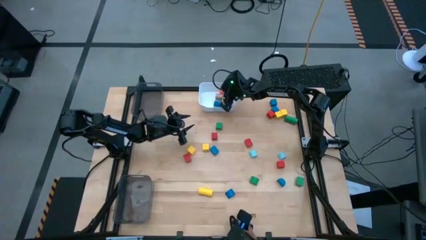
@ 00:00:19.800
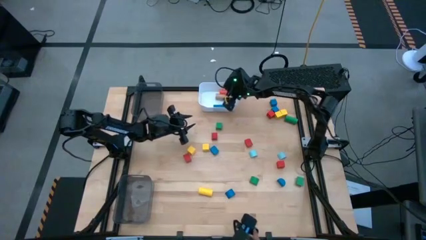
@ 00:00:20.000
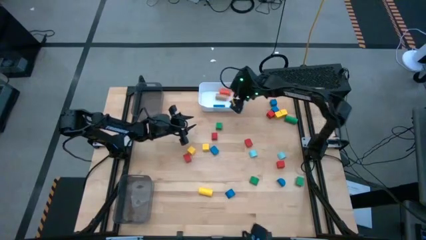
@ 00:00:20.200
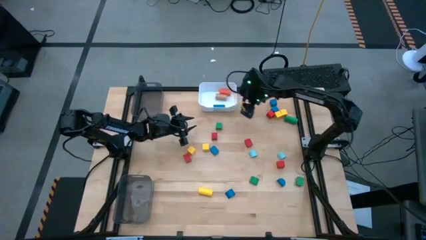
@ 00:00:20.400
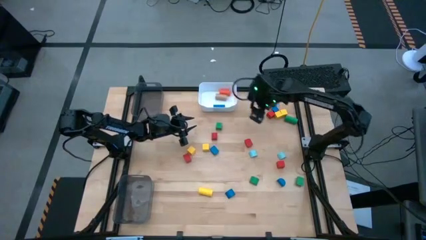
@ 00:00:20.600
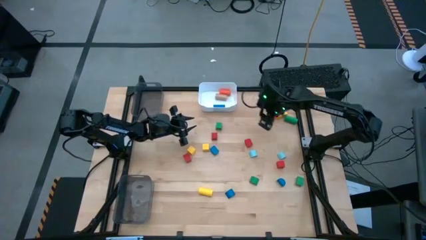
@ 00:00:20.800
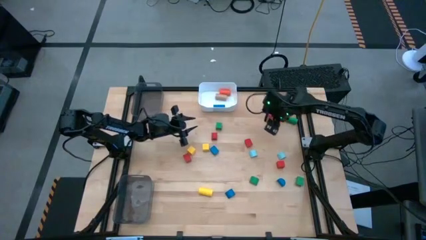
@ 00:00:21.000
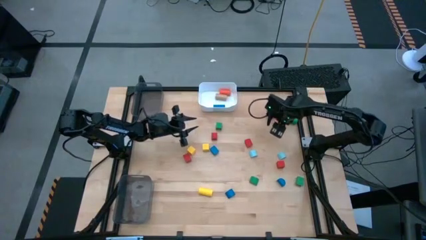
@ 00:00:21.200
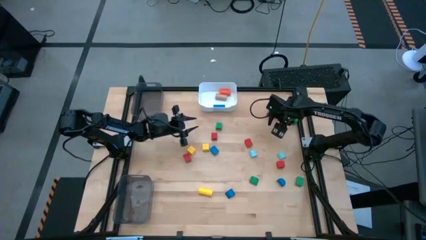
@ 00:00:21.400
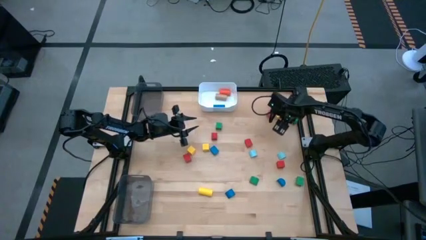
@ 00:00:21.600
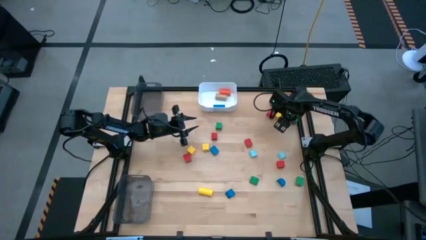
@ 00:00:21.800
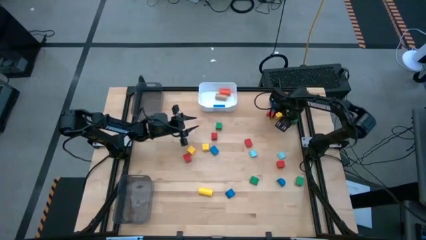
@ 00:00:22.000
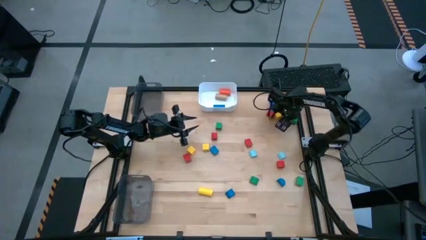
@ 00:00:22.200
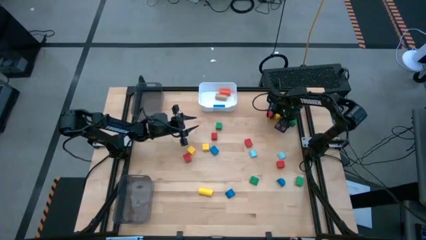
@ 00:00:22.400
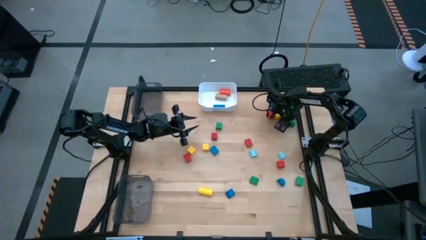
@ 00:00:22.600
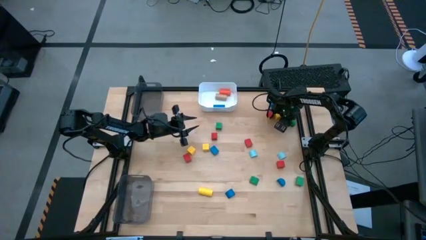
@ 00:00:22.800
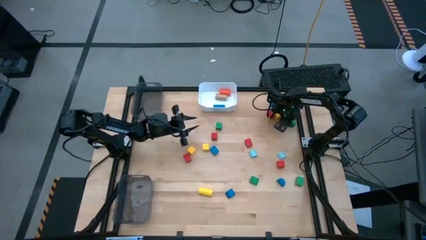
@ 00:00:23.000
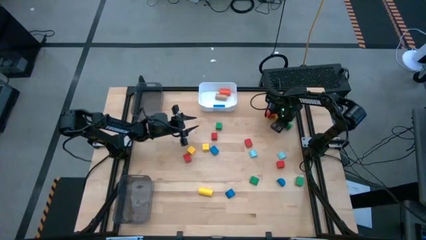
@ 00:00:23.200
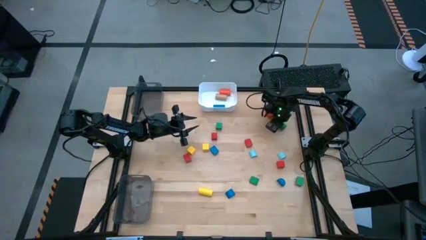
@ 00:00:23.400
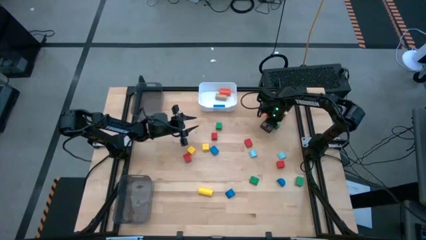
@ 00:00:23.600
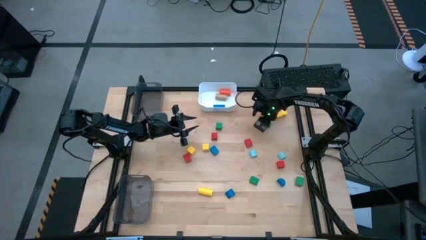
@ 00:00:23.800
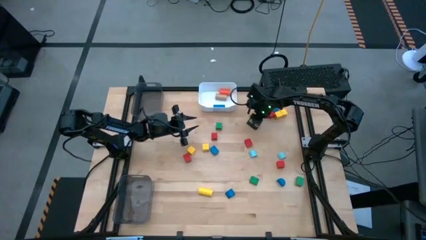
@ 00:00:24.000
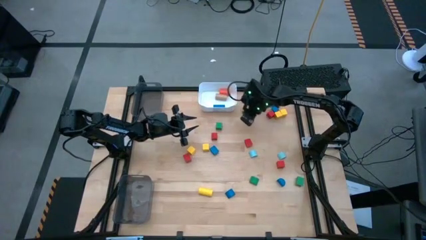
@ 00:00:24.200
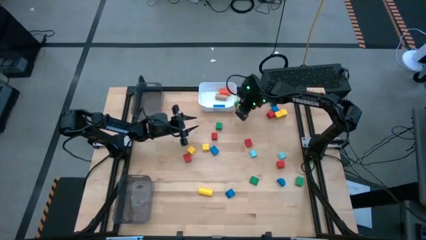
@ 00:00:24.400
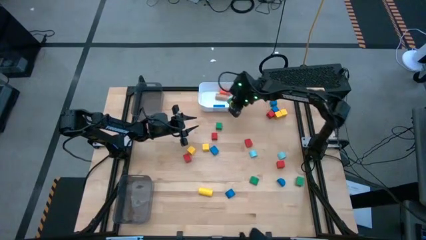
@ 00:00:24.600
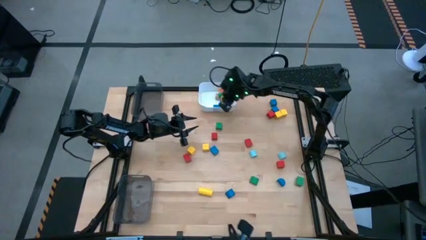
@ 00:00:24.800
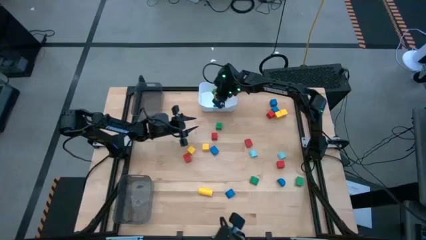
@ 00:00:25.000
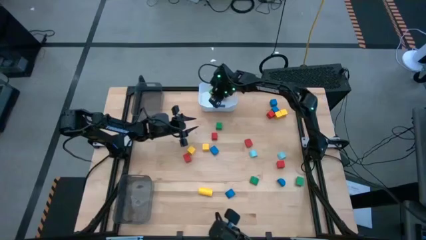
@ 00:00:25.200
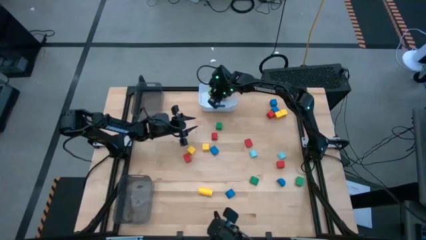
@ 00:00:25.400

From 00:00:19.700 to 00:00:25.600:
Task: Sort blocks by size
Put the green cylinder block into the white bin

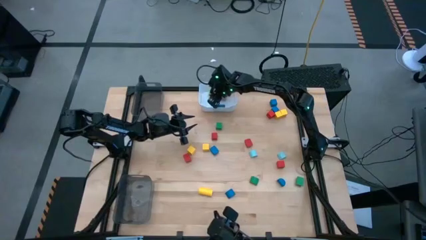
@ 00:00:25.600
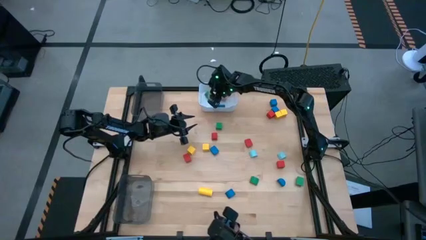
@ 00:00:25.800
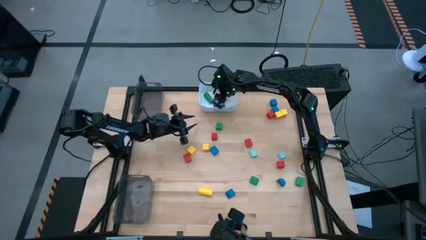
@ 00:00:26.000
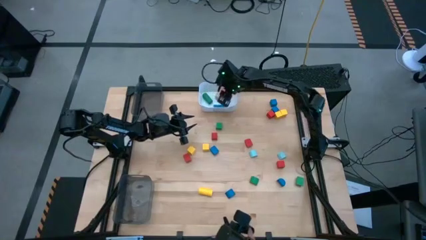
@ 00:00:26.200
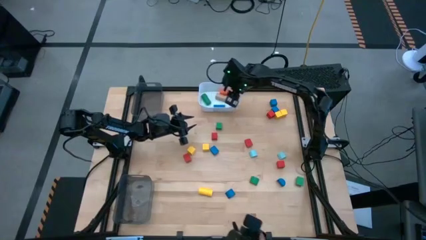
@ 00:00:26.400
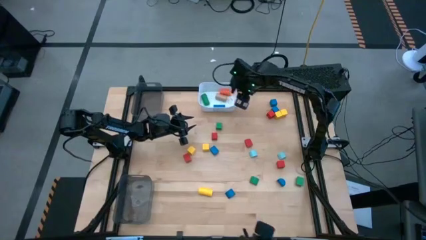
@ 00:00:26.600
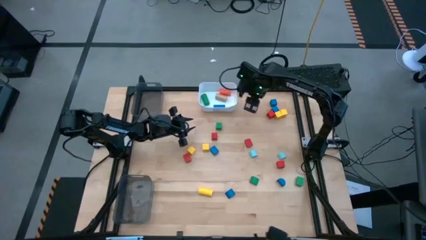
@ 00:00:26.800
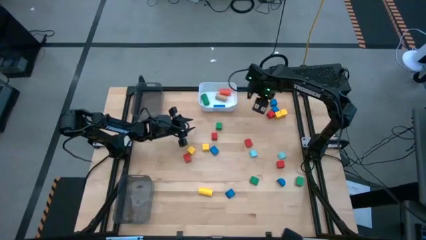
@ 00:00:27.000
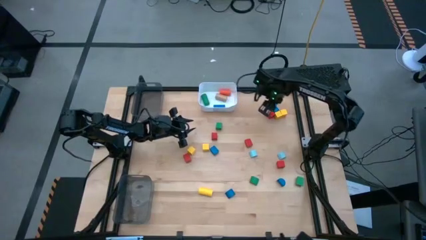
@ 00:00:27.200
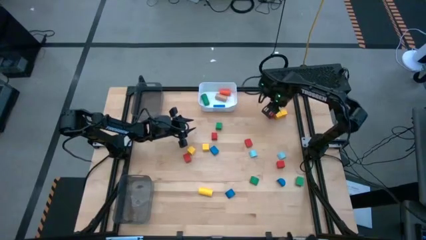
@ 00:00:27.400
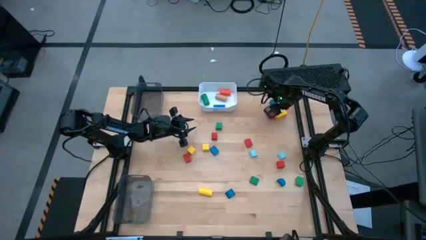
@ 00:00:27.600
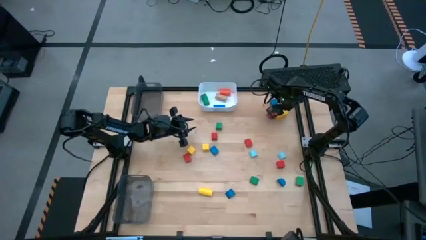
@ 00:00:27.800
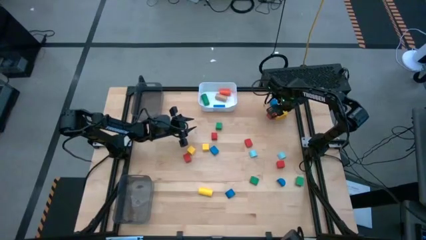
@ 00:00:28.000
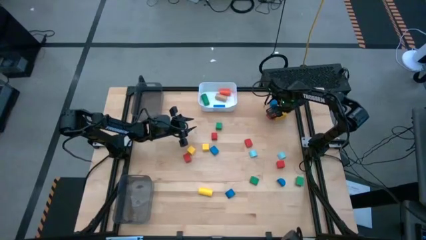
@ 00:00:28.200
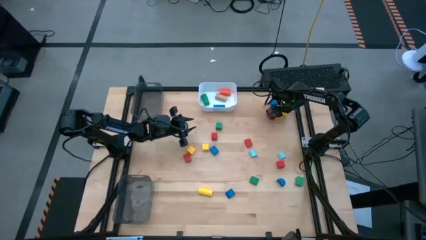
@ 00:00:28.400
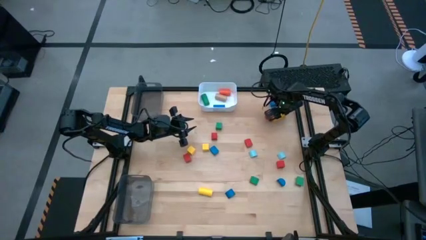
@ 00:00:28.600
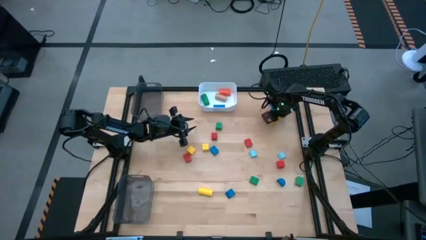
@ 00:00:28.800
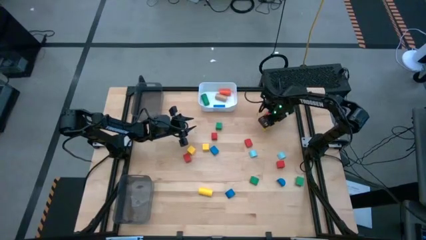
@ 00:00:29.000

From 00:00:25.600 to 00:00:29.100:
Adjust the yellow block

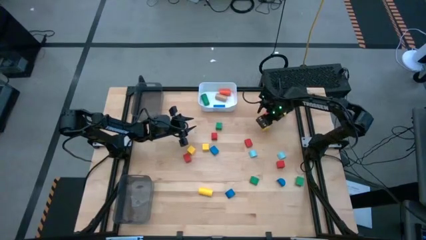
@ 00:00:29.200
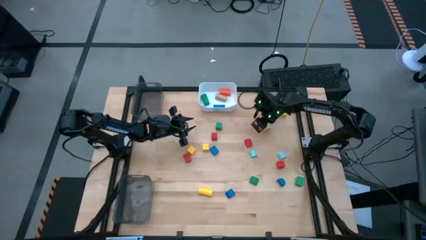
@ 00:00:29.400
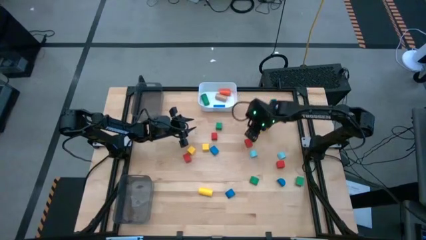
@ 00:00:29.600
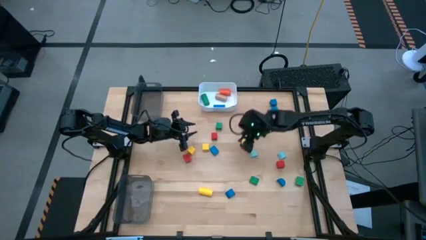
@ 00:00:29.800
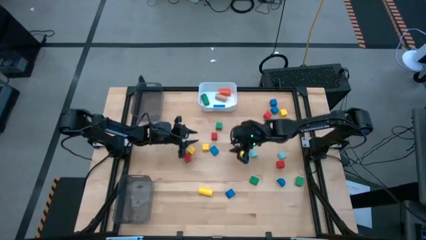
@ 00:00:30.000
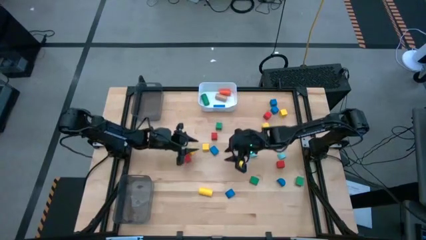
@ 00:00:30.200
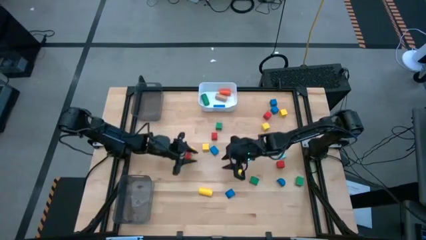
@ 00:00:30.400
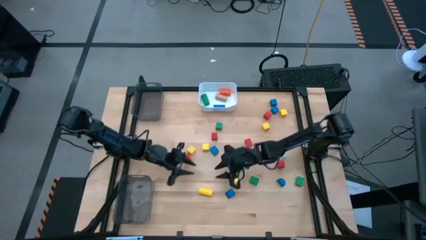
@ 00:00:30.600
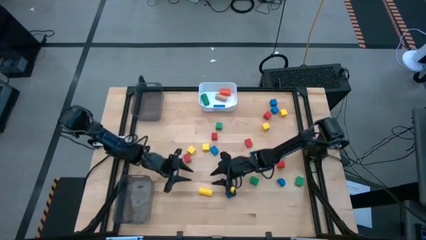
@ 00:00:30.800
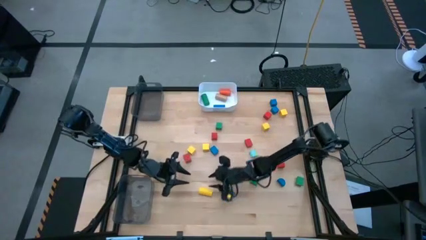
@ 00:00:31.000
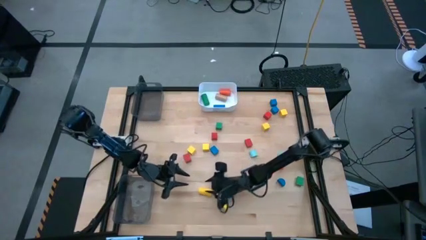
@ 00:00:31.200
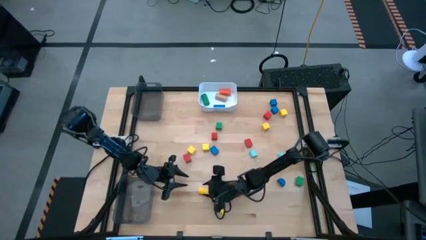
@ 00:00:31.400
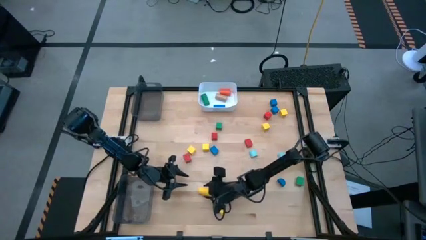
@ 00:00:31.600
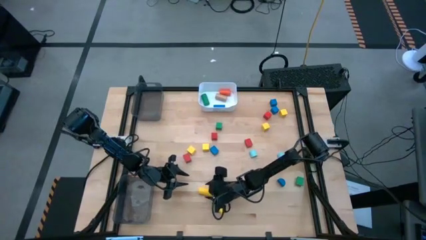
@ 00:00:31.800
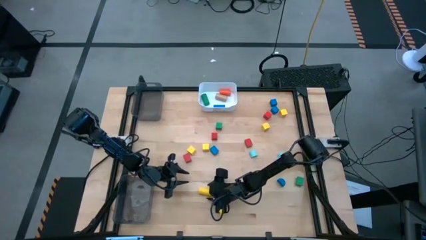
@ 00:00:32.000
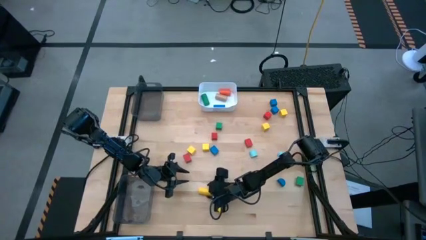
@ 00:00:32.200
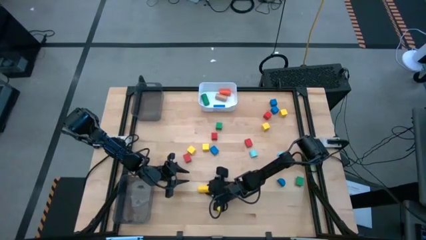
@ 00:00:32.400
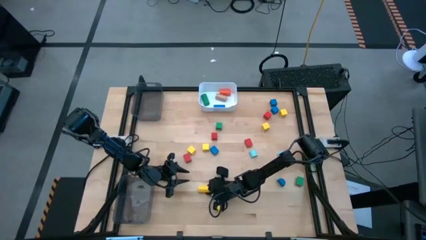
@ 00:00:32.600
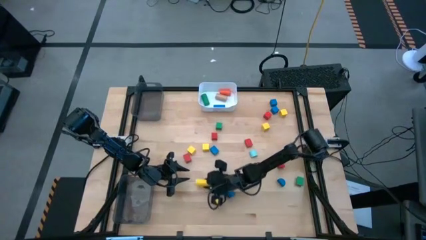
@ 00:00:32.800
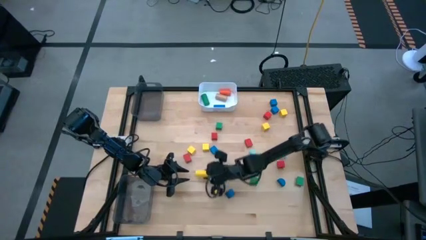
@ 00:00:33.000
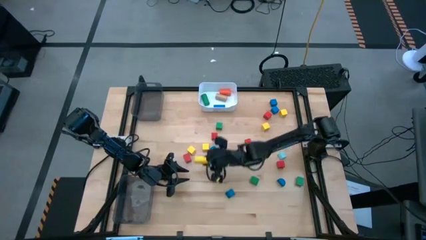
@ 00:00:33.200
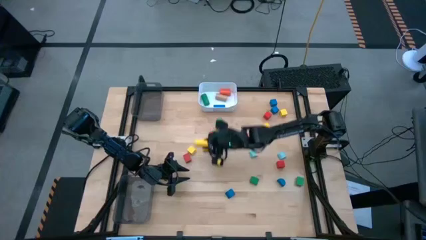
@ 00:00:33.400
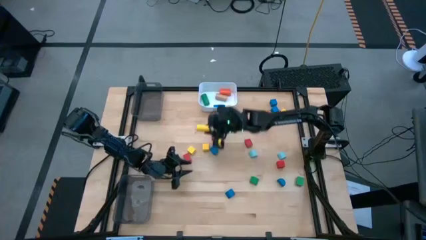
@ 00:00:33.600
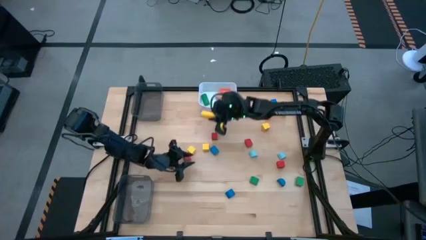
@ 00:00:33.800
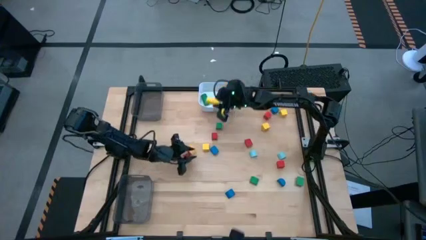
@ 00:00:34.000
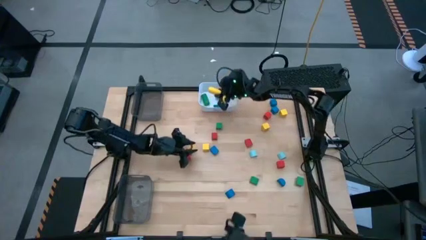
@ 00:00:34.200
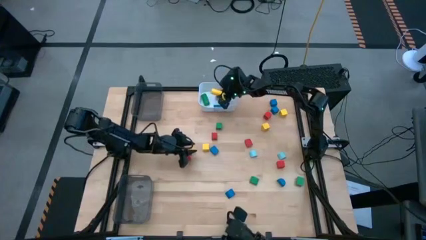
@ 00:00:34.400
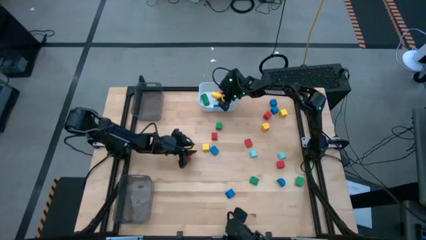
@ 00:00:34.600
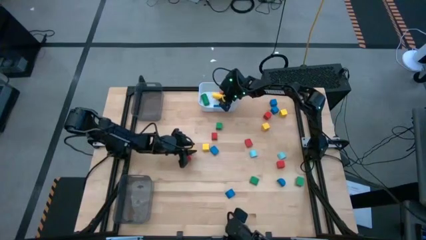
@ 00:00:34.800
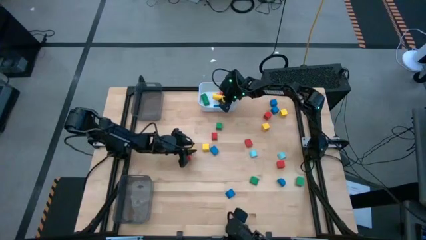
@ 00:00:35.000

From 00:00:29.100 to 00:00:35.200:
Put the yellow cylinder block into the white bin

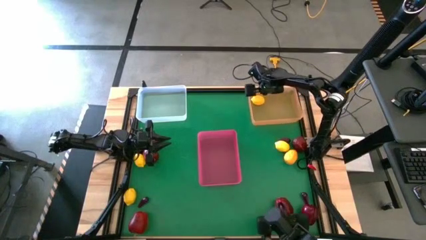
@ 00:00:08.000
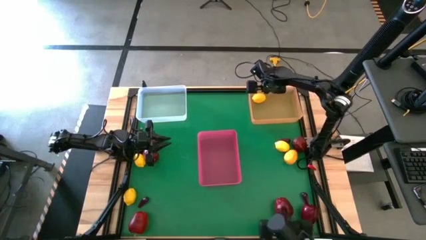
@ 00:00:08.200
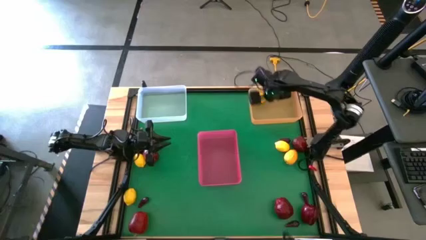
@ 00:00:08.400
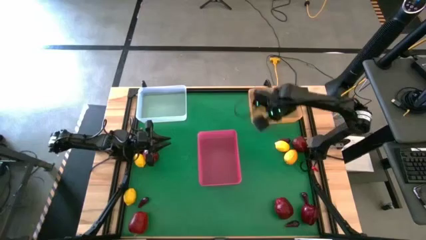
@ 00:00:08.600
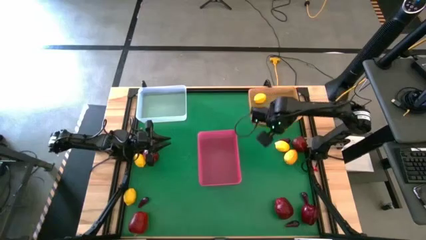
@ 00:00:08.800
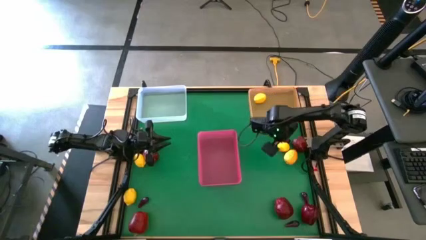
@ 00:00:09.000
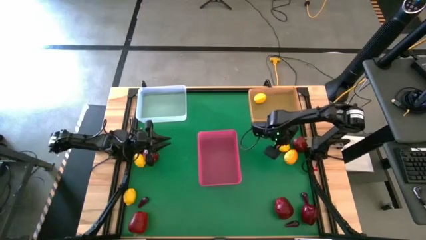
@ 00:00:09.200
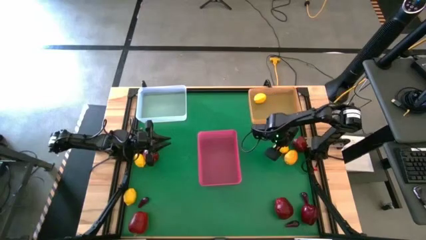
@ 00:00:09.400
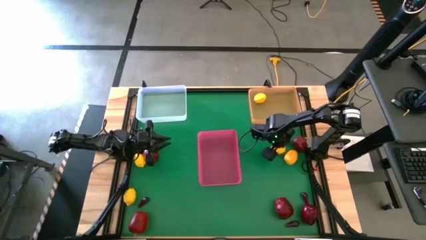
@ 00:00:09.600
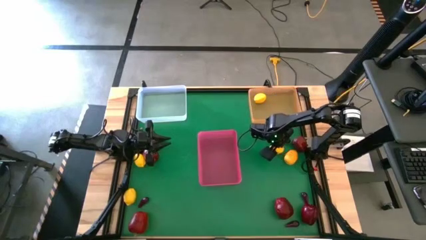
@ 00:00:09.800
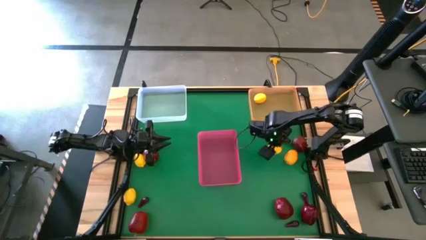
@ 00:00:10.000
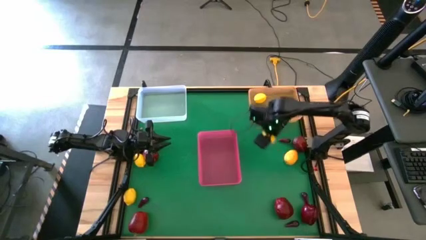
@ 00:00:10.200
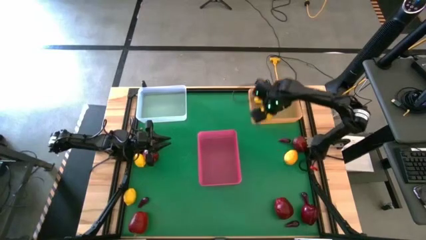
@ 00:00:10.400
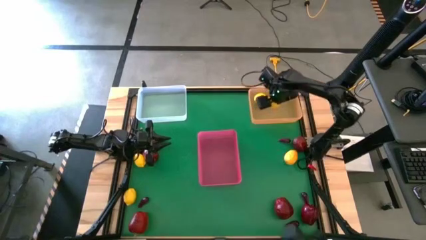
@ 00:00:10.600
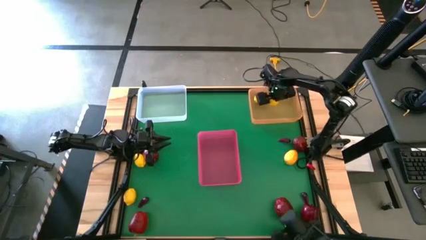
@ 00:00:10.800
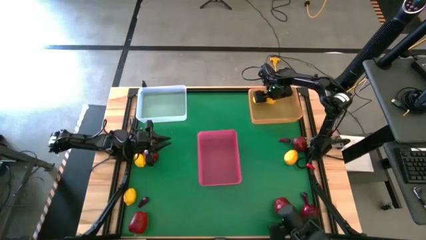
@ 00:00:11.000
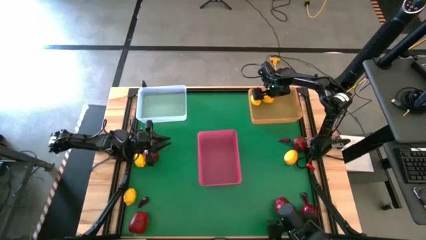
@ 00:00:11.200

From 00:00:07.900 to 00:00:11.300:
Task: Sort produce into baskets
Put the lemon into the orange bin
